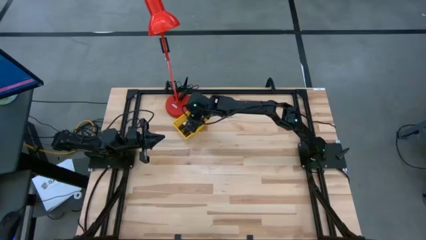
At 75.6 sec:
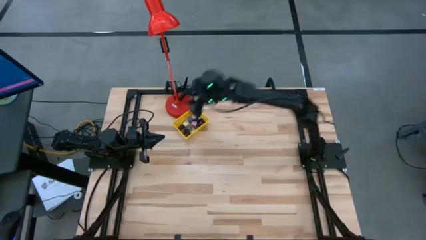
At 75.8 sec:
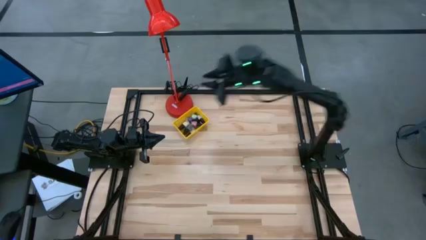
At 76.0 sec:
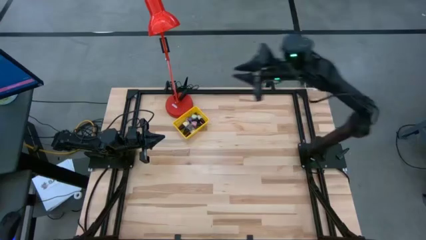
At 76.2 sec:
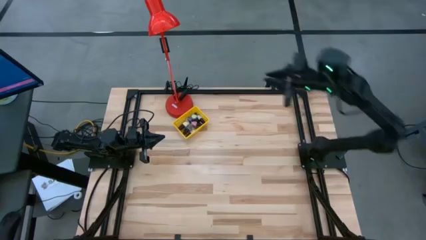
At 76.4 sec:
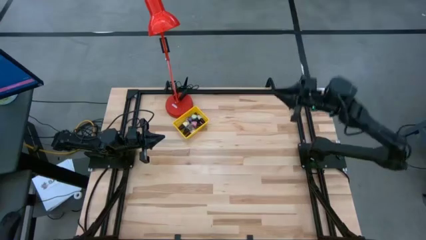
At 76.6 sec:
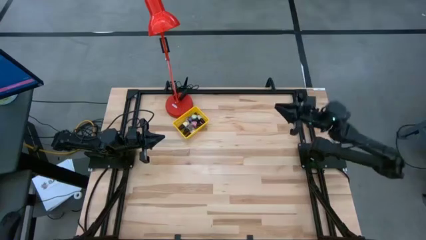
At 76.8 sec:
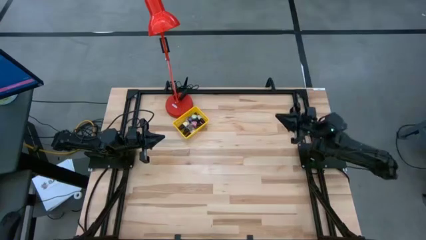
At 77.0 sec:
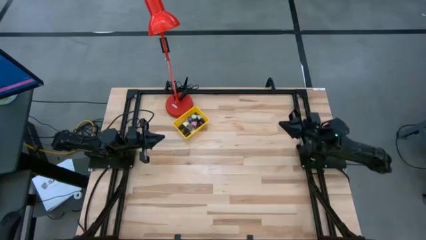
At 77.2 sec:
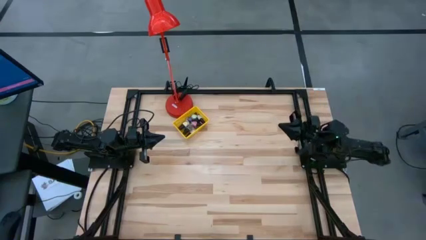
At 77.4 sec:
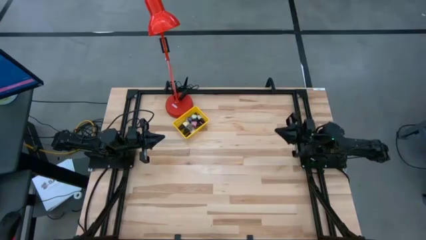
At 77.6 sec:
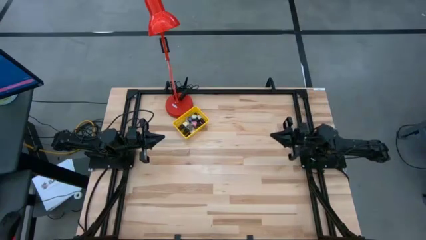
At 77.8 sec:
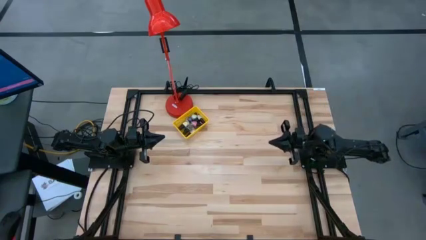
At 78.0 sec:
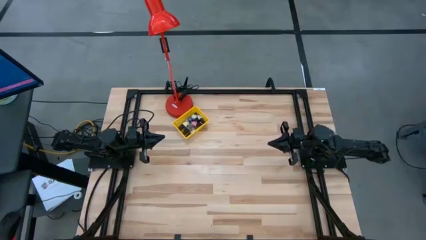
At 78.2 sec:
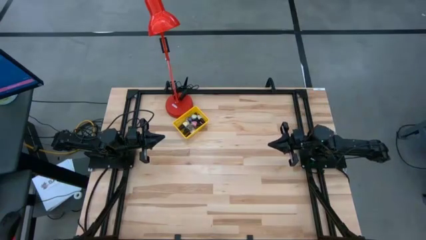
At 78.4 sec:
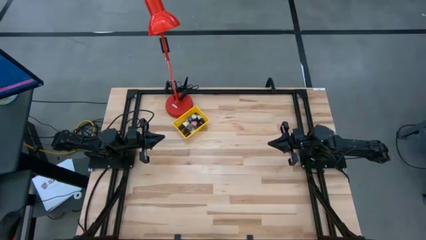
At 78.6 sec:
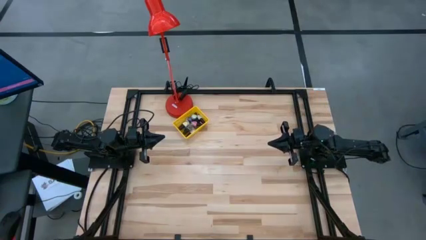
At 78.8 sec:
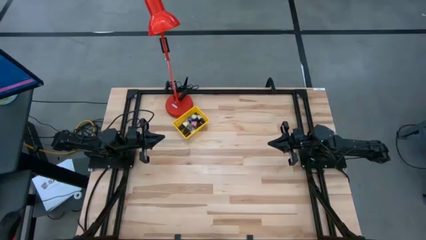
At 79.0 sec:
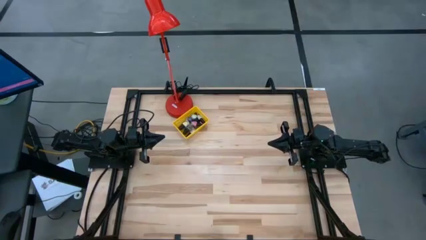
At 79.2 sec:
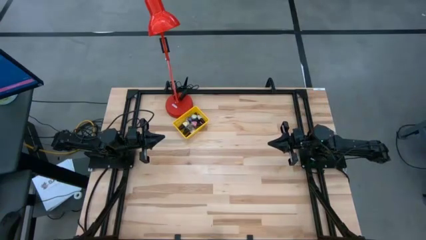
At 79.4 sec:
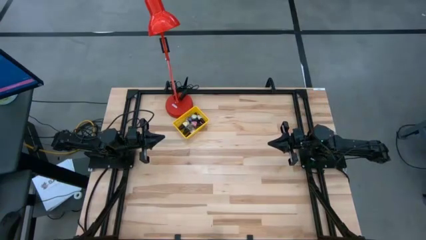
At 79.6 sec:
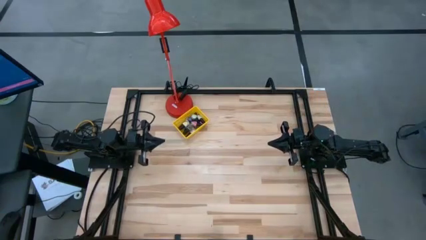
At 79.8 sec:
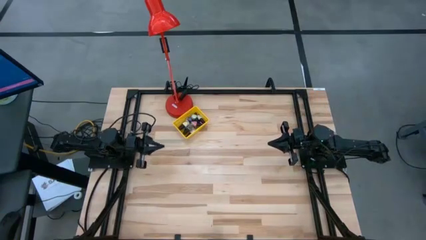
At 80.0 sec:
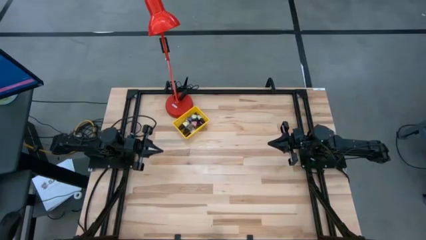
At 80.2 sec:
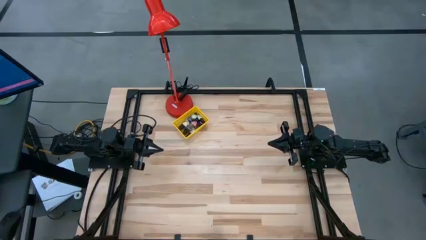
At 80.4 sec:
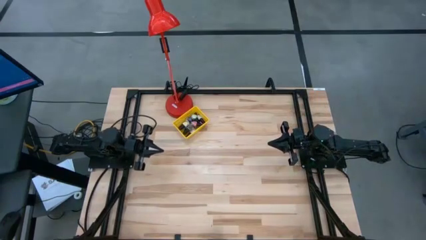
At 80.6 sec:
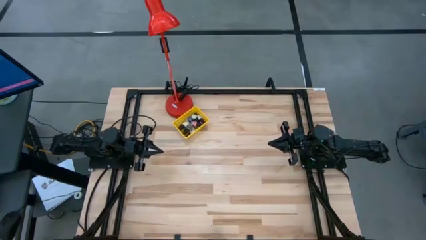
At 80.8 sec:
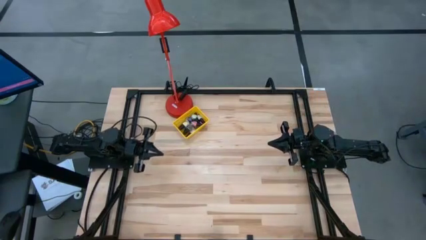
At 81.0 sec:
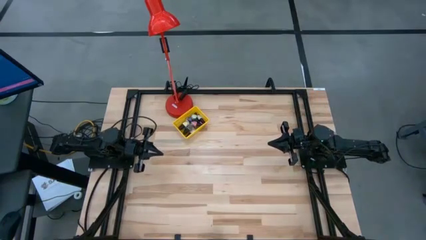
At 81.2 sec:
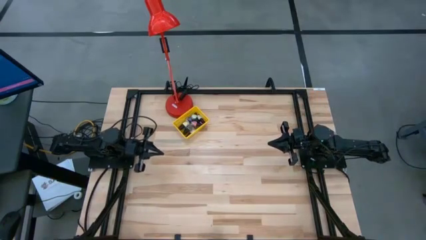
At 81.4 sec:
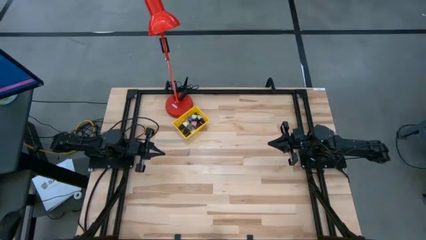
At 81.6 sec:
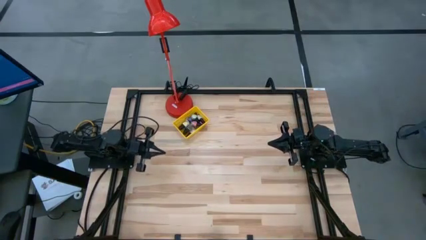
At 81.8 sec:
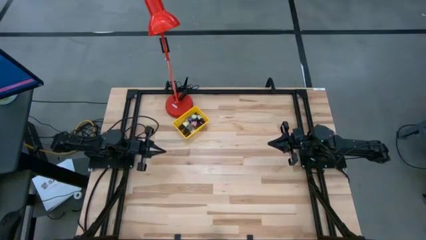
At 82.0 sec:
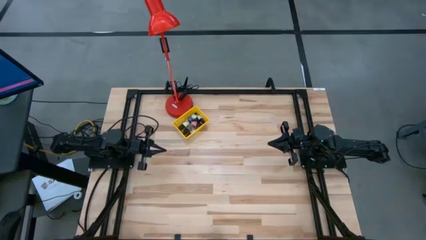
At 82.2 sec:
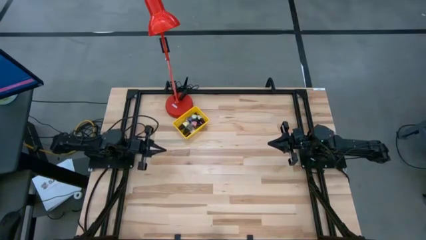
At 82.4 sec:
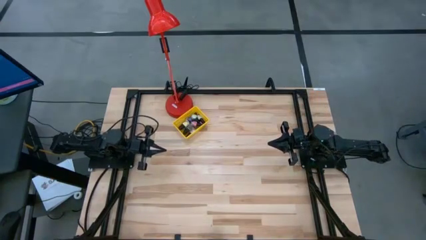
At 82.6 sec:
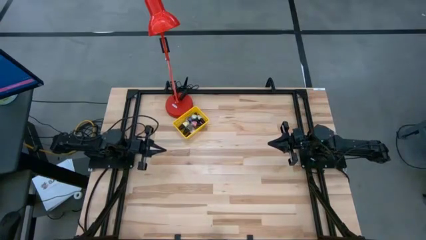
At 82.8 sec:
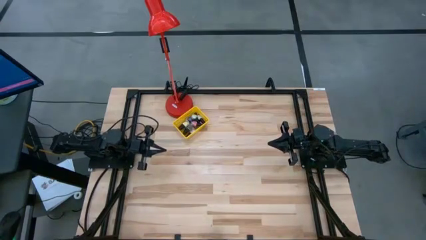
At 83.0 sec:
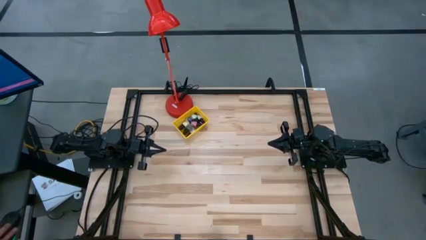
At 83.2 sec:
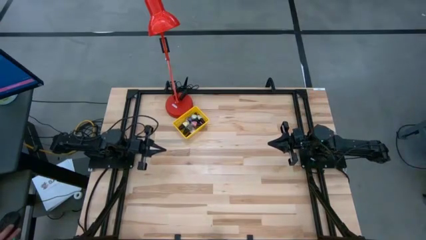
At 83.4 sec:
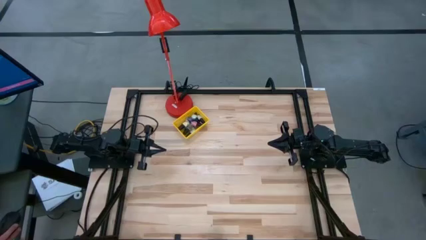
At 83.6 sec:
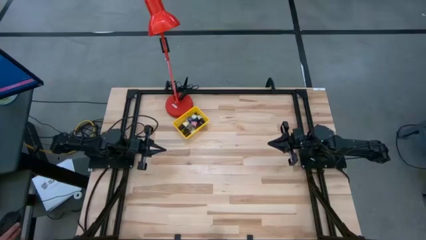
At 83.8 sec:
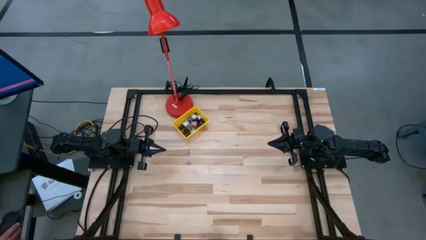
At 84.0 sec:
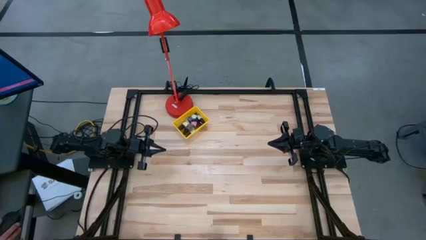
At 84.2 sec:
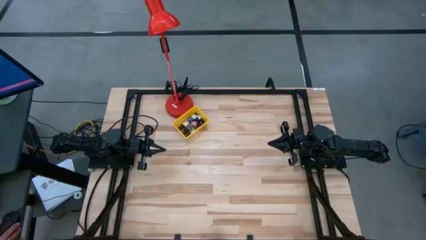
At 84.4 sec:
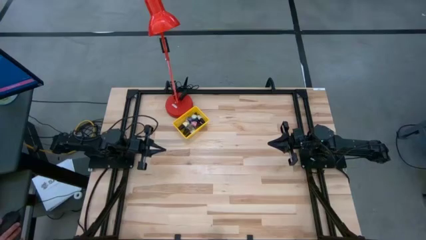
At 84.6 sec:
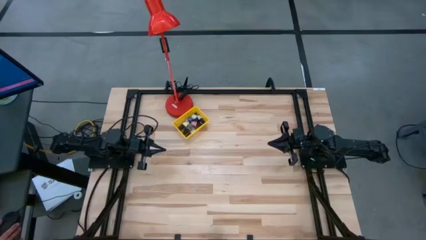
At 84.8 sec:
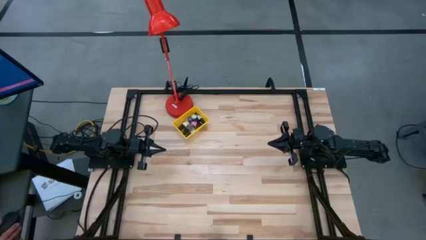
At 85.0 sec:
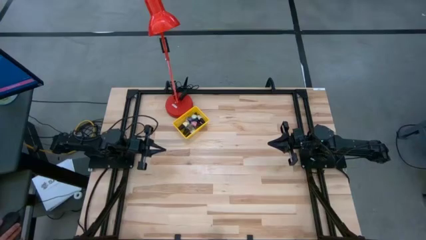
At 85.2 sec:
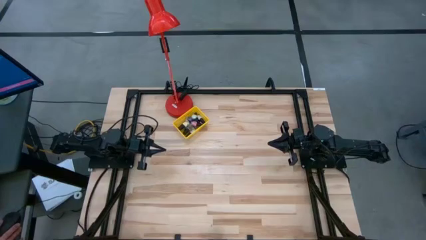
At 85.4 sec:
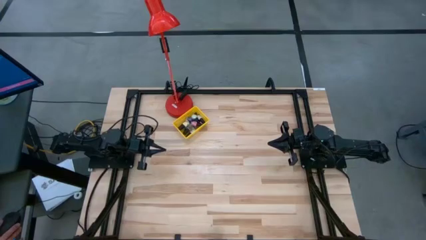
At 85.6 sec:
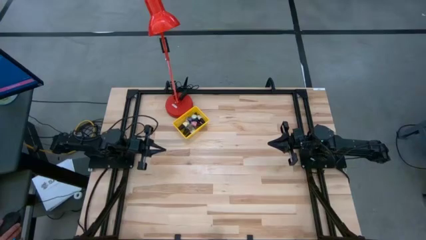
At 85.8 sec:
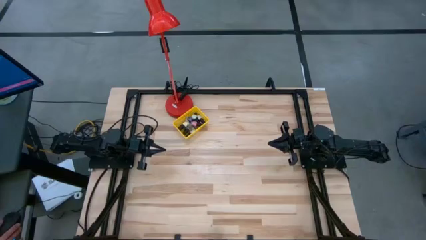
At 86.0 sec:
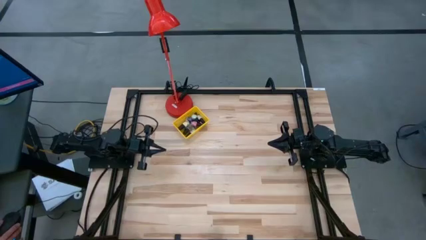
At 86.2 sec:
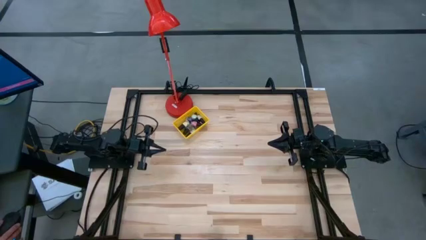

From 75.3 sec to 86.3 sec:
Task: Pick & Place Nail Polish
Return to Home Position

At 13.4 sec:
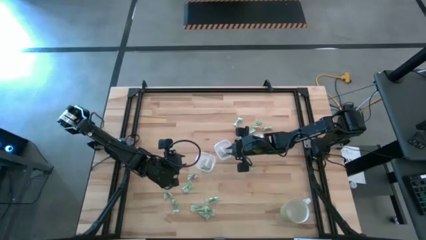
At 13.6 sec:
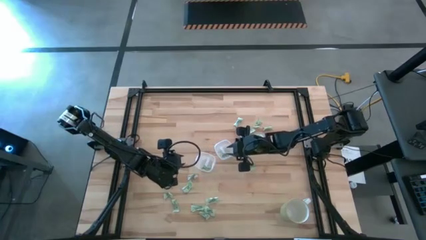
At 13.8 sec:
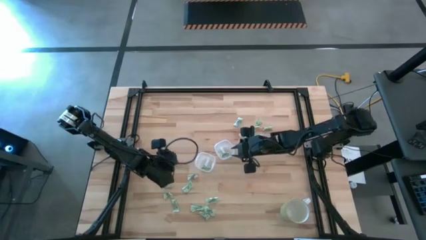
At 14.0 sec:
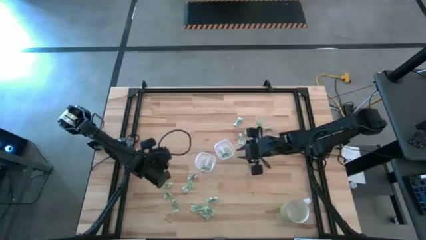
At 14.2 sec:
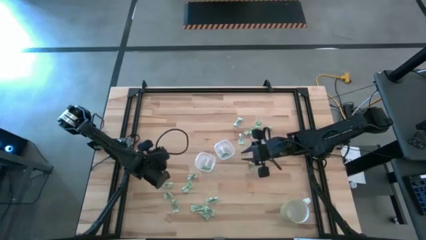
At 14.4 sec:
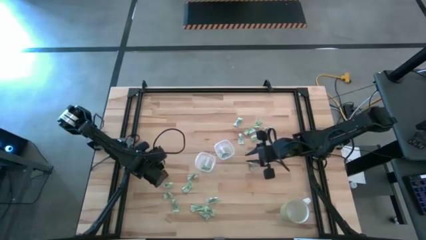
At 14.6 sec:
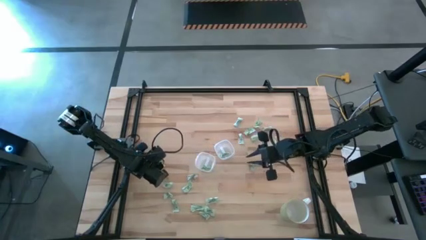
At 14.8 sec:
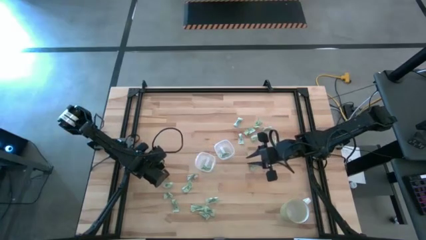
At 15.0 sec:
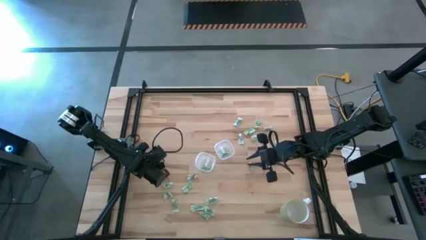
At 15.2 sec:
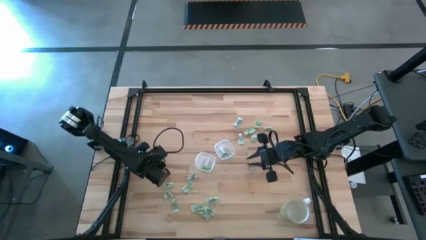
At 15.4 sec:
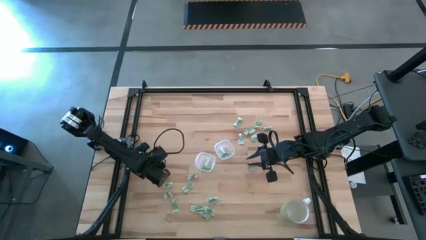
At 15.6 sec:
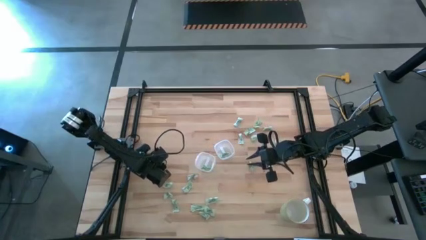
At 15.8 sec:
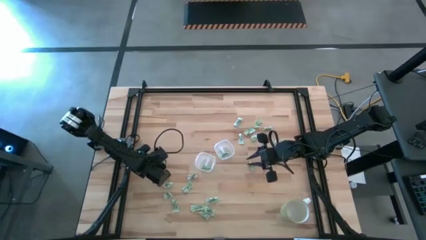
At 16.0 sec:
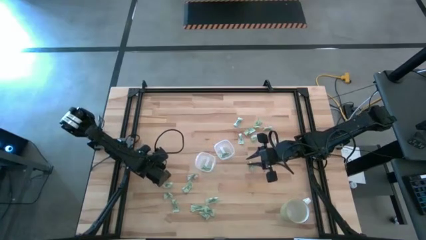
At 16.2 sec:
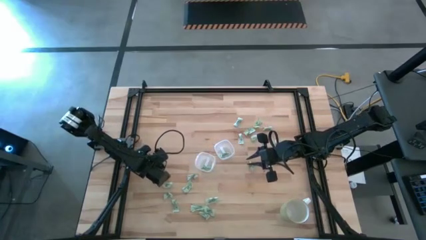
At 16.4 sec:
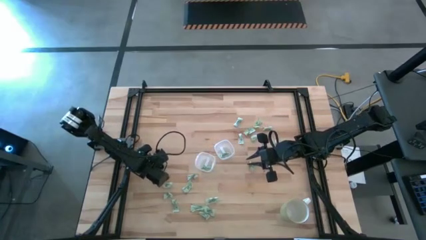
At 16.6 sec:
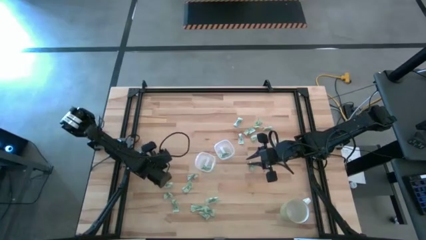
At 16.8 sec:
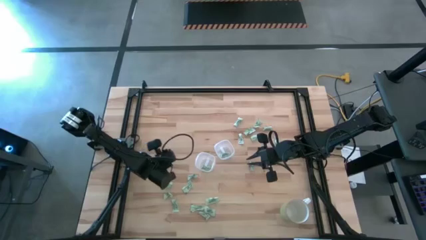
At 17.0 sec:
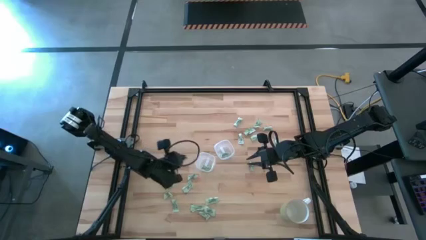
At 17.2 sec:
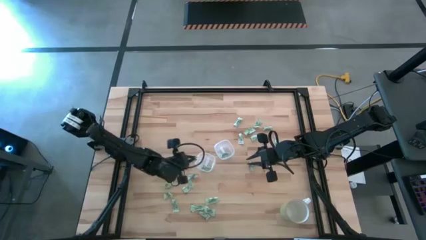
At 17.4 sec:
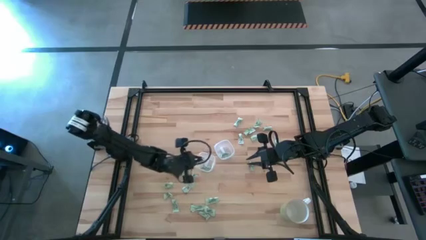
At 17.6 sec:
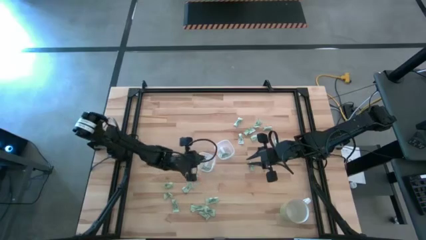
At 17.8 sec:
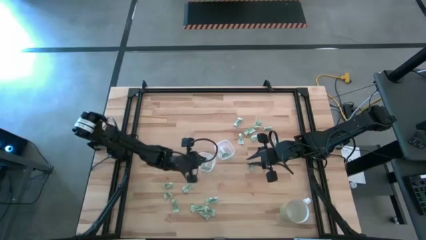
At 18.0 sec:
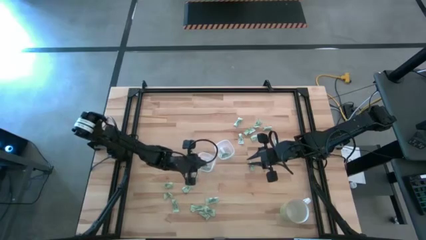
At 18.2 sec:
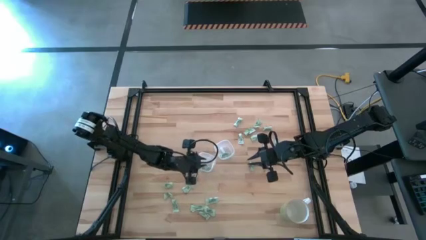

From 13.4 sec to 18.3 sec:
Task: Pick and place items into bin
Put the stevia packet into the left bin
